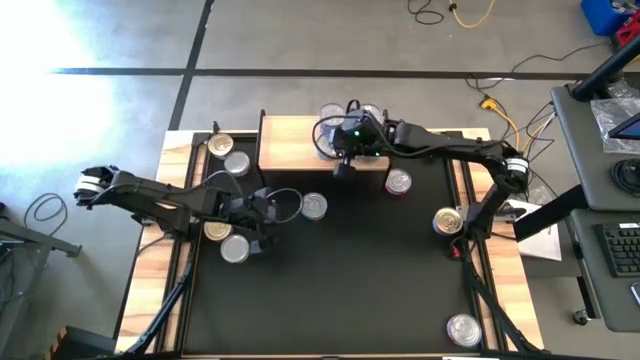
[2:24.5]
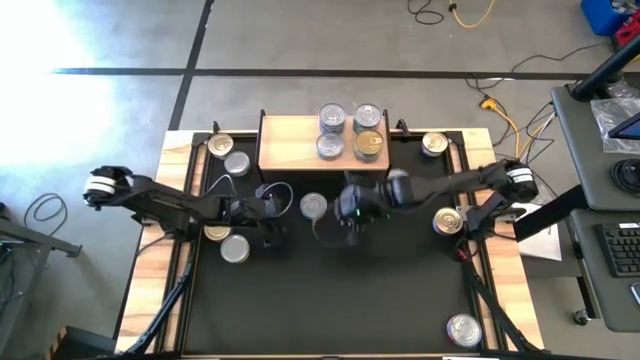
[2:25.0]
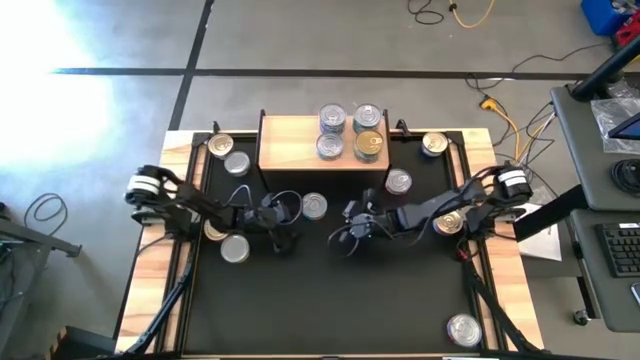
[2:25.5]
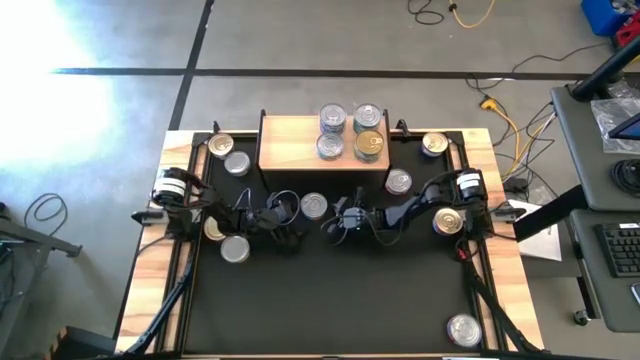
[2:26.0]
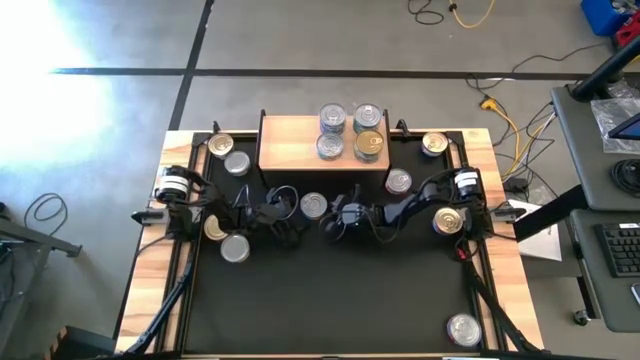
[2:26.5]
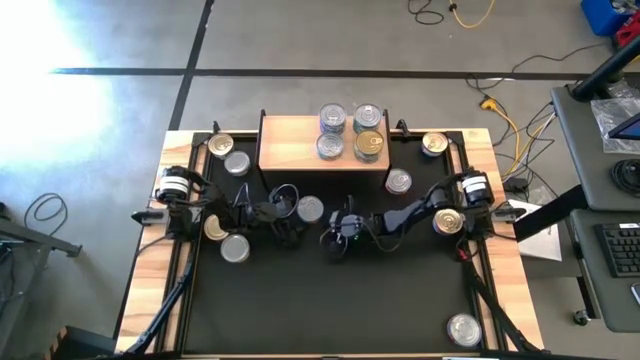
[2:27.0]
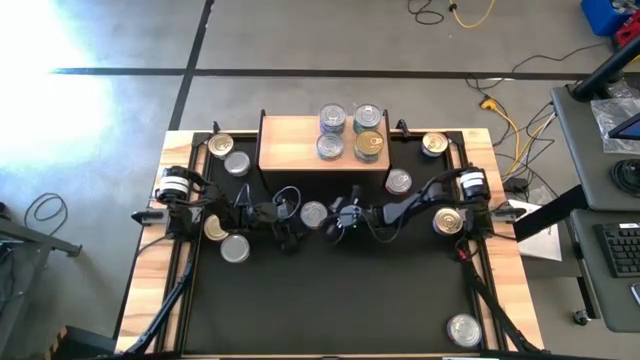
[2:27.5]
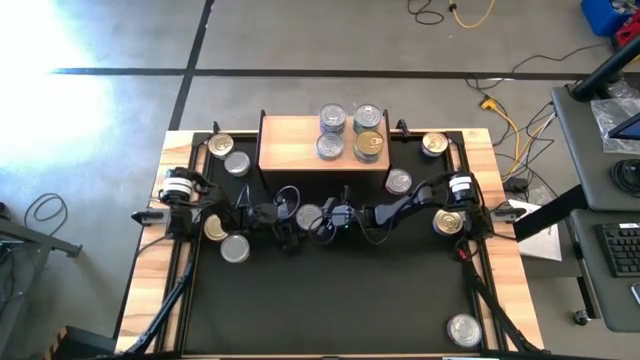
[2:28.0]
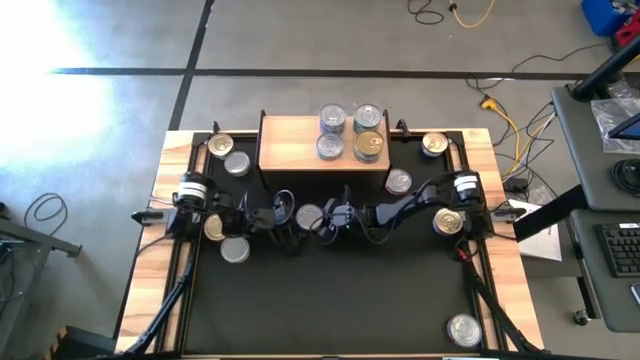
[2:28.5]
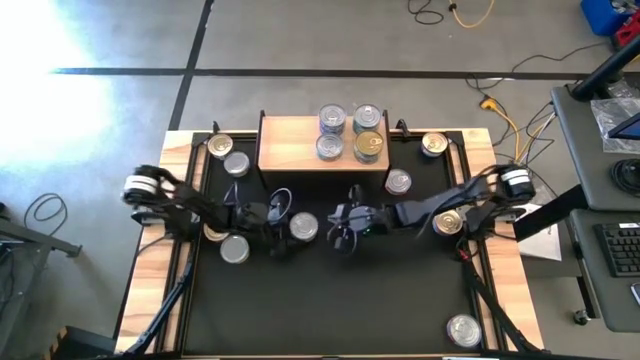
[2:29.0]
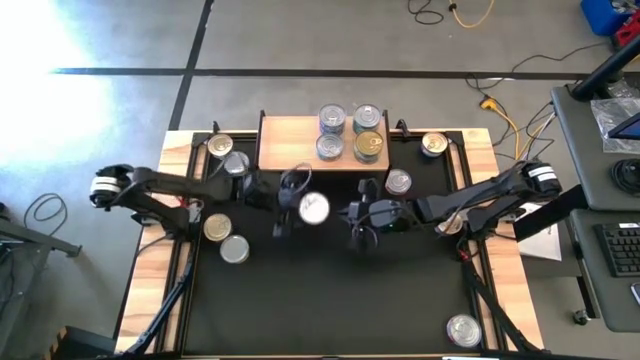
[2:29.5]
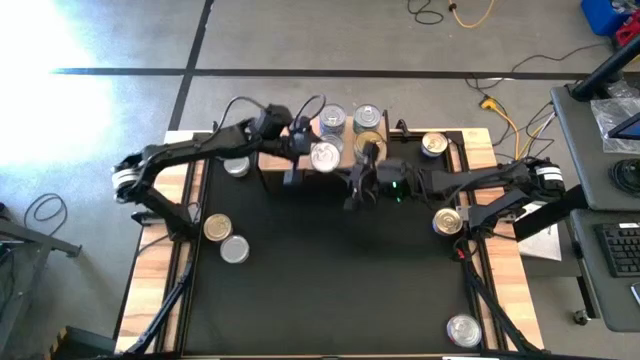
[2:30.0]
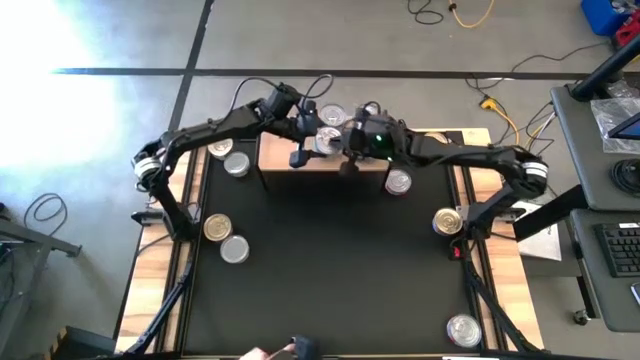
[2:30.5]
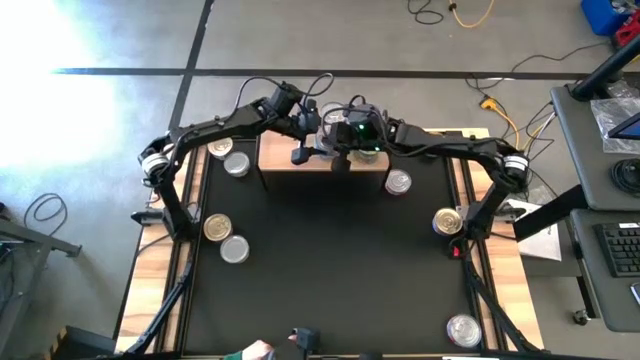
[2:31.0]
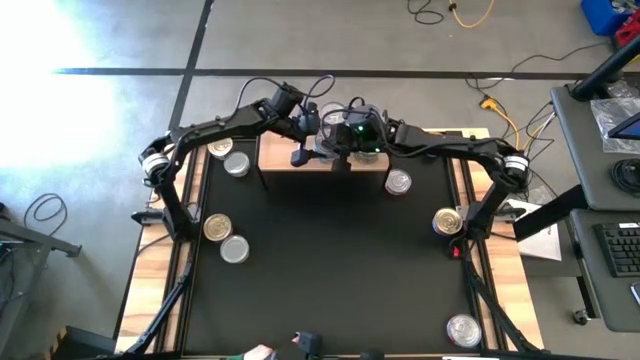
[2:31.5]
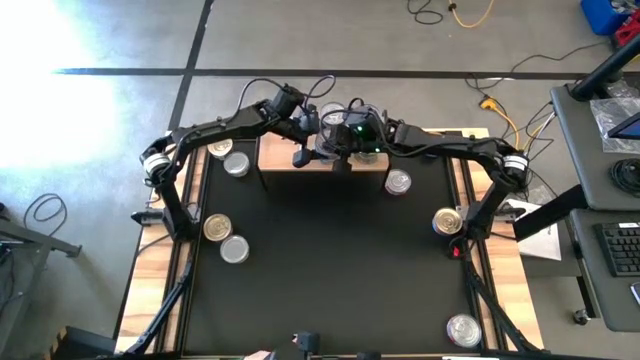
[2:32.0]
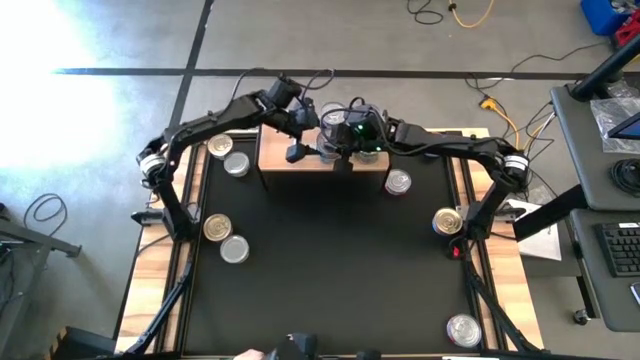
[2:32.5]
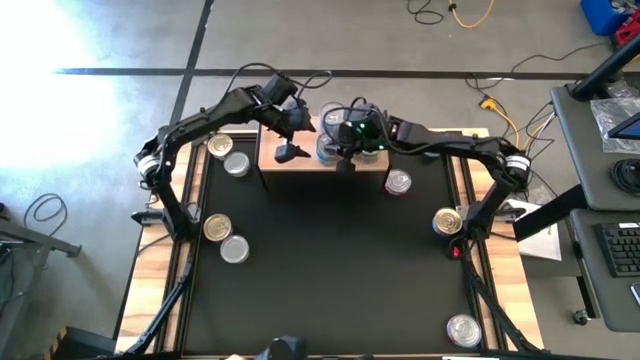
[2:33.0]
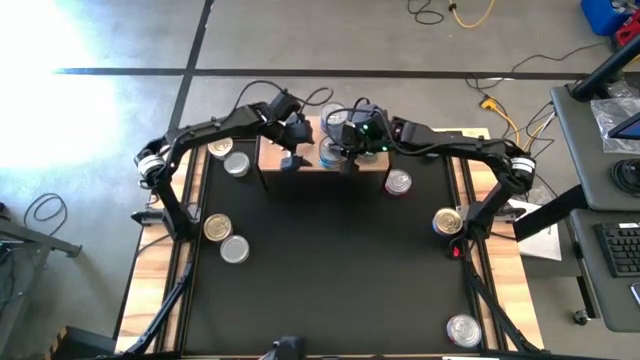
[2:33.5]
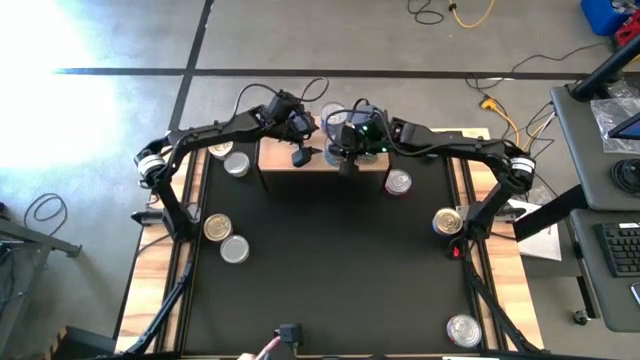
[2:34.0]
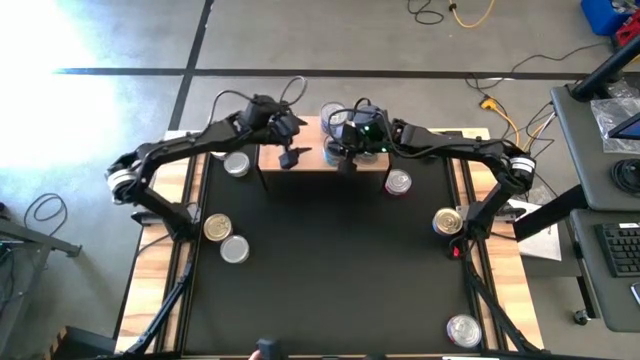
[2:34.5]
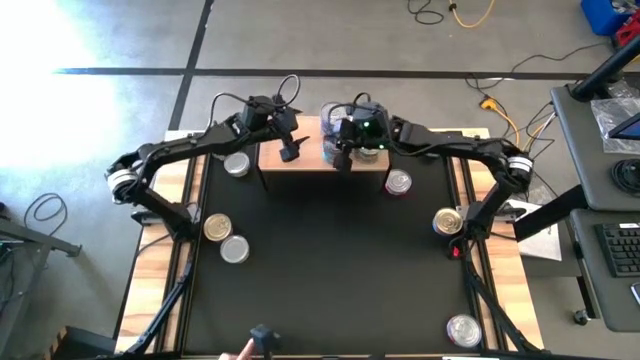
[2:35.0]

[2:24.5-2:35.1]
Task: Stack canned seafood by type on shelf
Stack the blue yellow tuna can on top of the blue yellow tuna can on the shelf

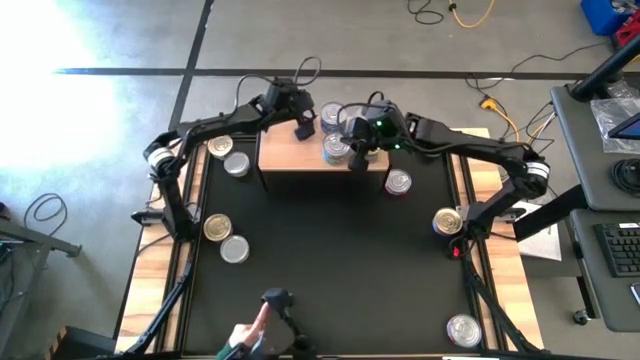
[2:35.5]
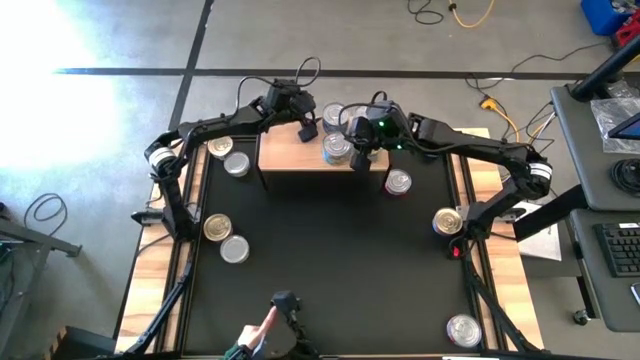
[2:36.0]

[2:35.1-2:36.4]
Adjust the stacked dark blue tuna cans on the shelf

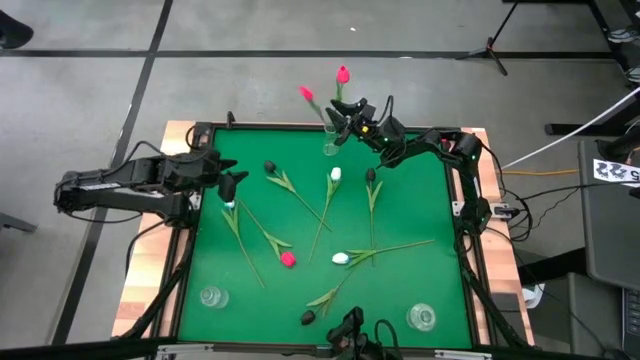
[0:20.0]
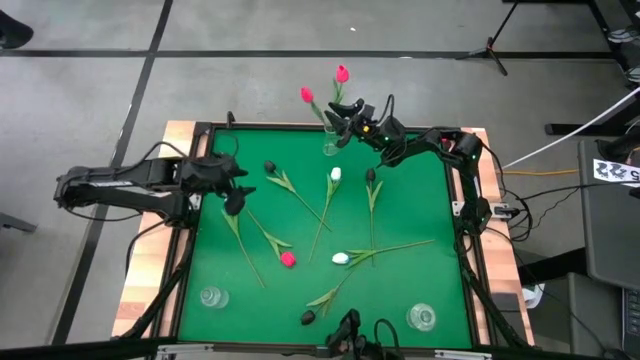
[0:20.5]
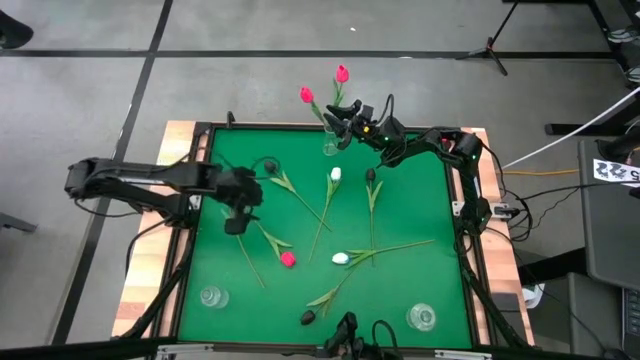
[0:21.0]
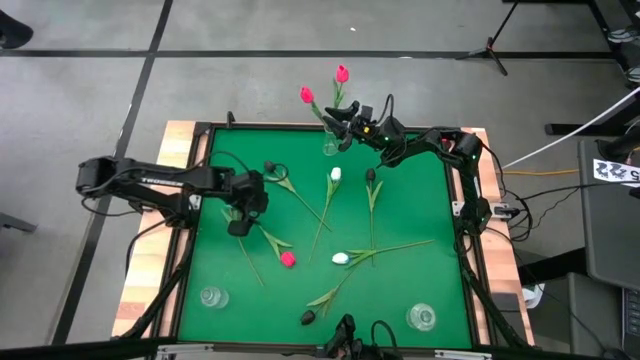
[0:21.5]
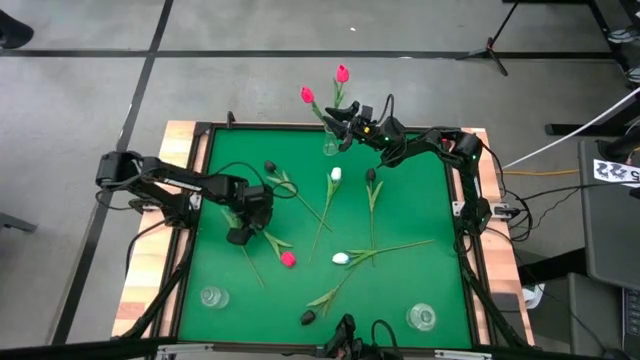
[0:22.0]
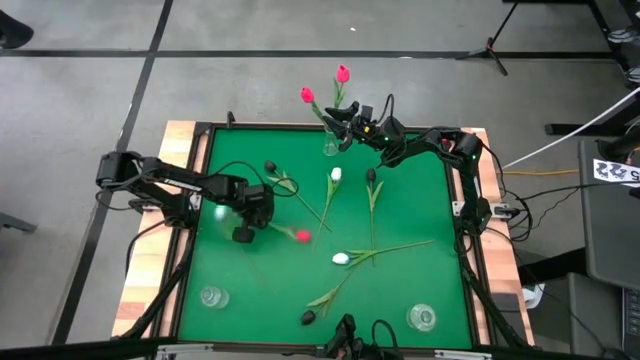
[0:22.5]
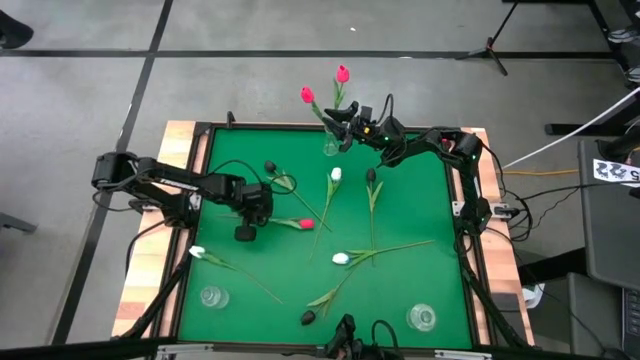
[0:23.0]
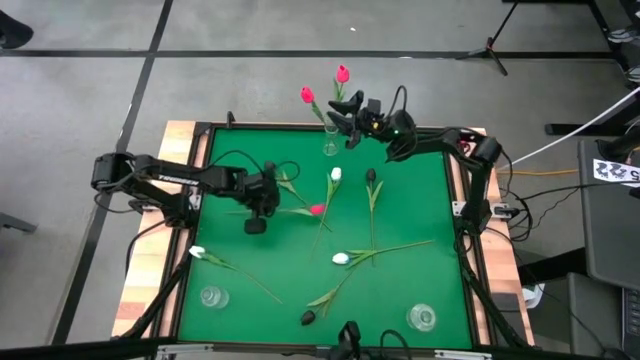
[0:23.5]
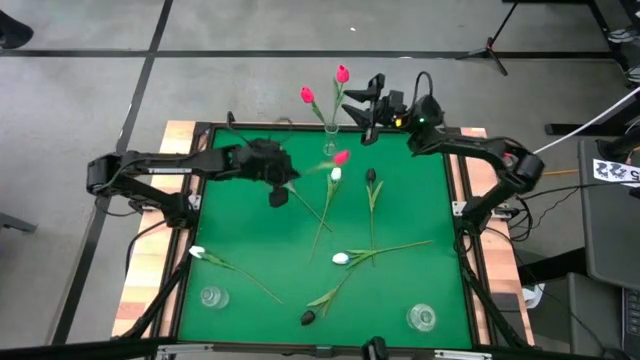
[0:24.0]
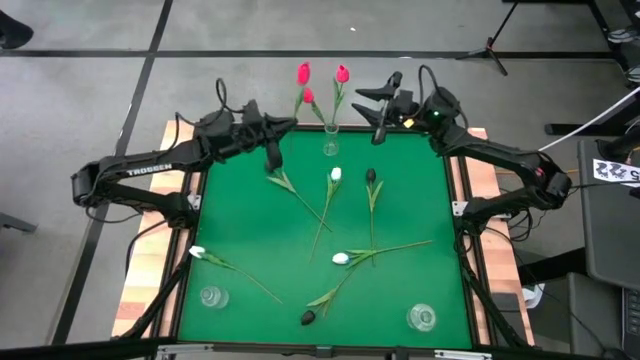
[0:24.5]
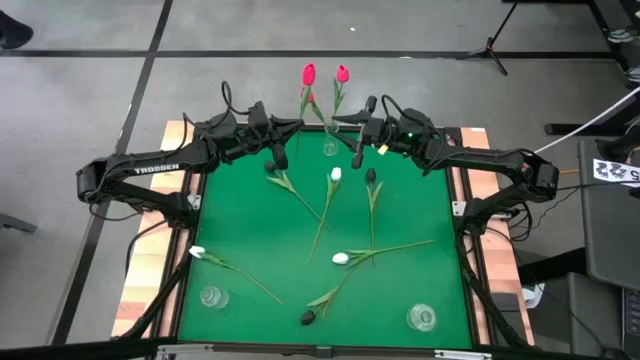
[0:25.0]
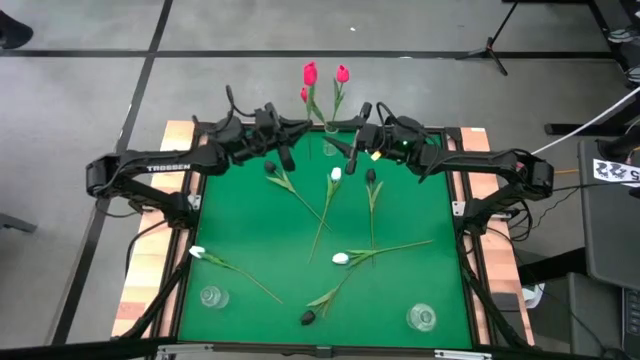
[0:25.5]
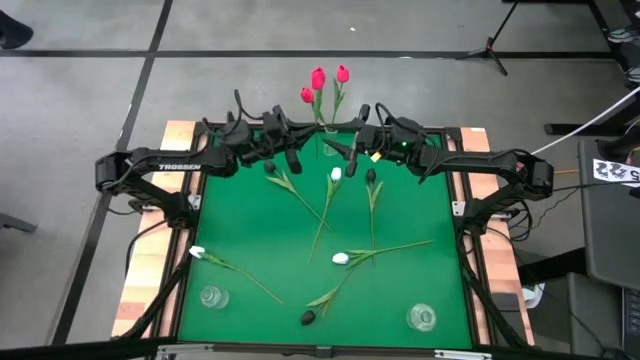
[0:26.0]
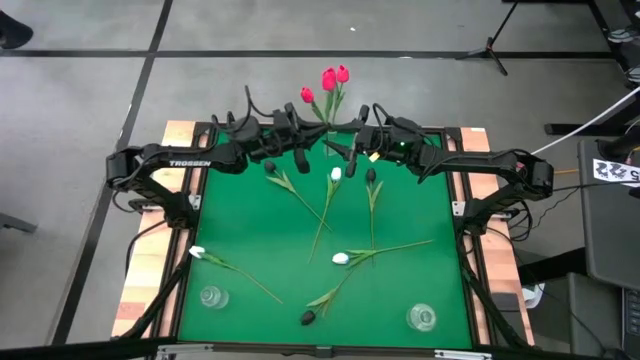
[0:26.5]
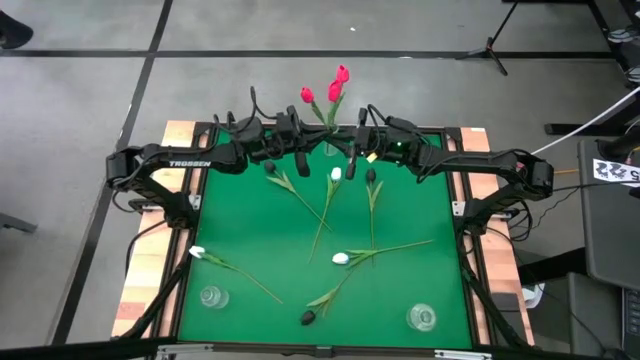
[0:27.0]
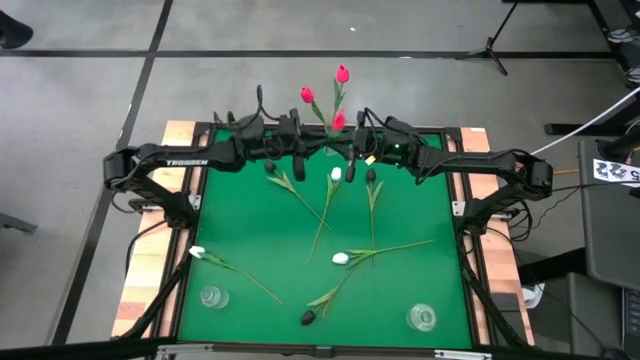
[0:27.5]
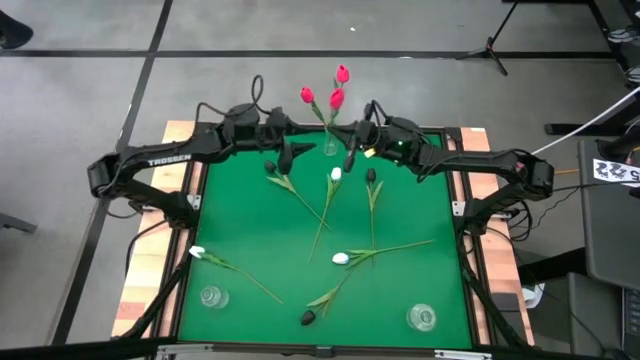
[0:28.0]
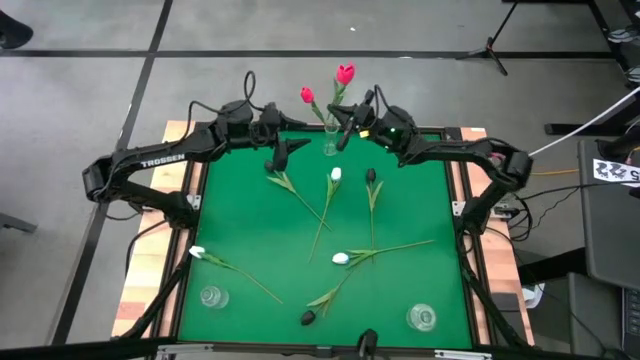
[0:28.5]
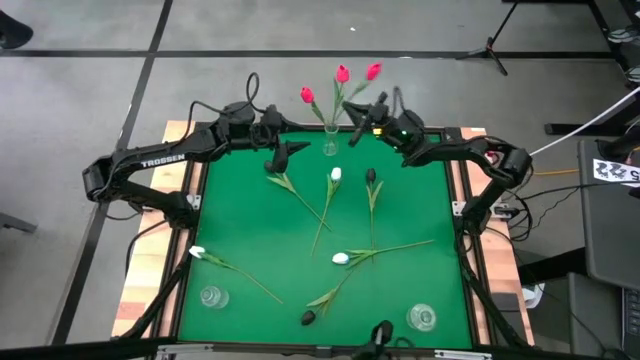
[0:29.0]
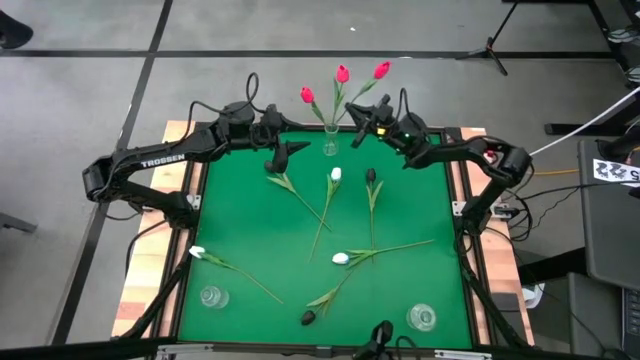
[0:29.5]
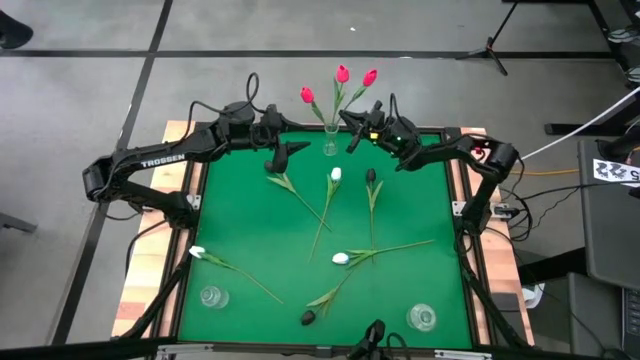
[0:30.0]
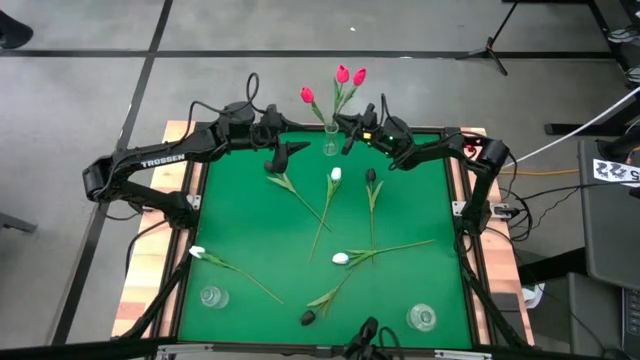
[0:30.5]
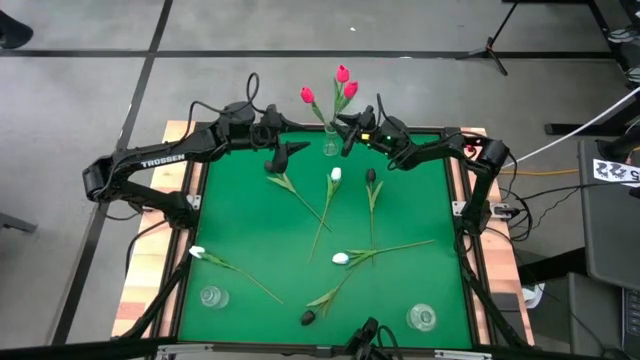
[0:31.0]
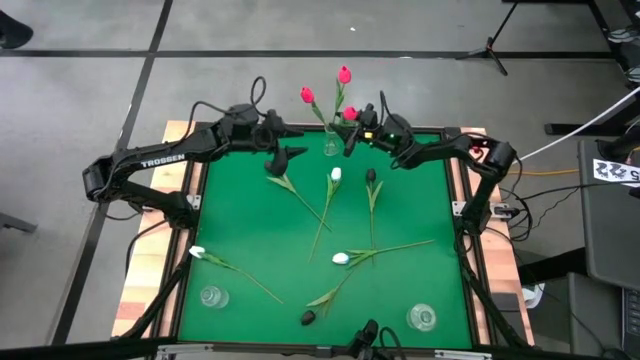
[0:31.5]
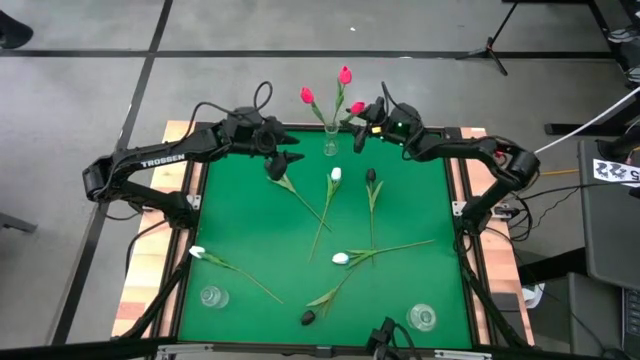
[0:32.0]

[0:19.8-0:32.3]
Task: Sort flowers into vase by color
Put the red tulip into the top transparent vase
